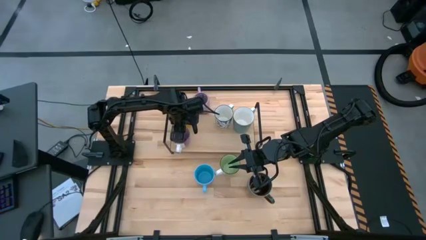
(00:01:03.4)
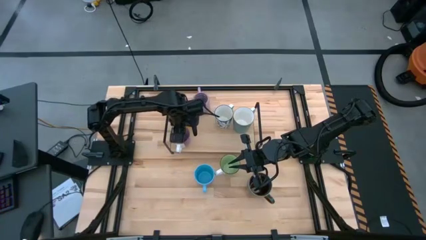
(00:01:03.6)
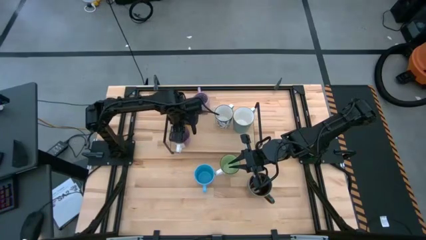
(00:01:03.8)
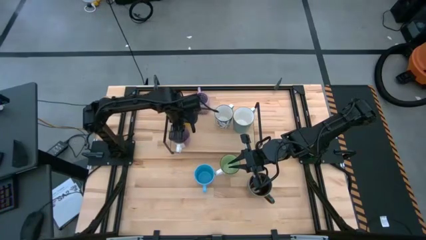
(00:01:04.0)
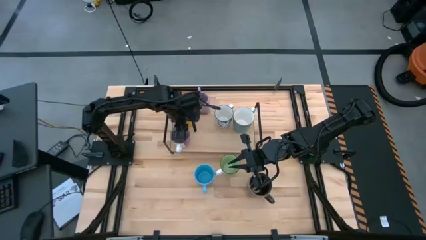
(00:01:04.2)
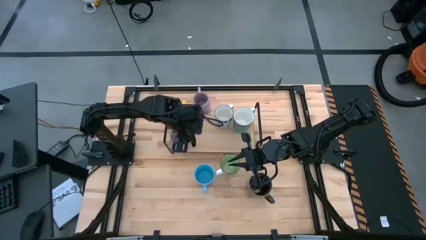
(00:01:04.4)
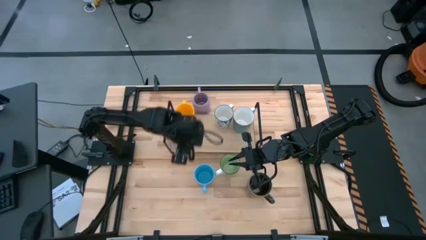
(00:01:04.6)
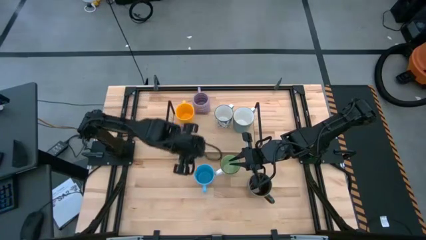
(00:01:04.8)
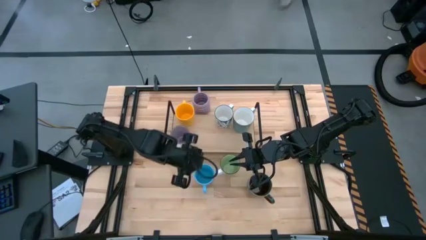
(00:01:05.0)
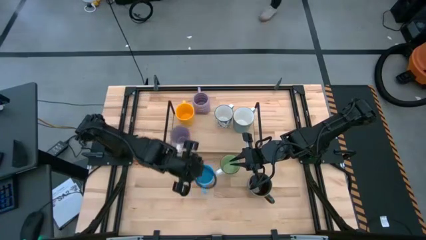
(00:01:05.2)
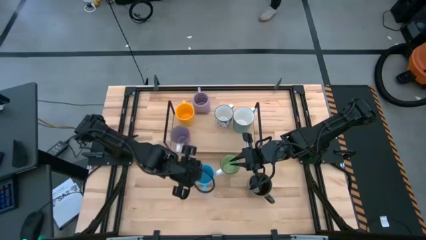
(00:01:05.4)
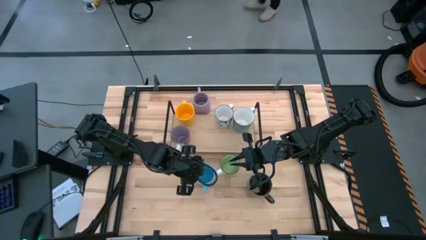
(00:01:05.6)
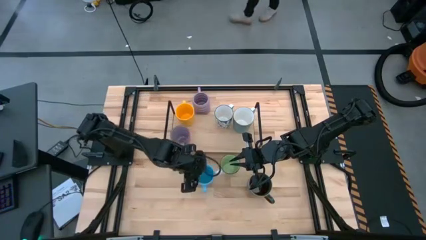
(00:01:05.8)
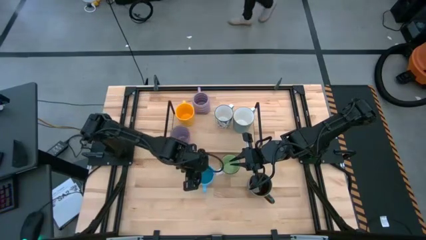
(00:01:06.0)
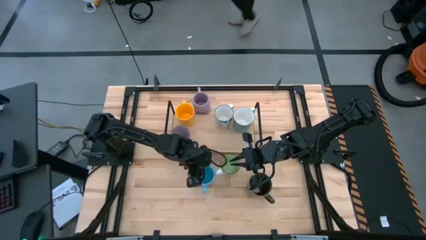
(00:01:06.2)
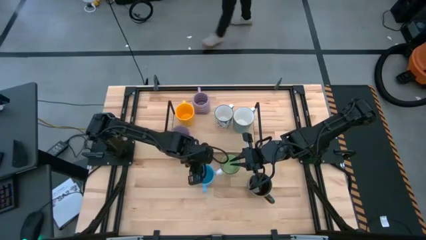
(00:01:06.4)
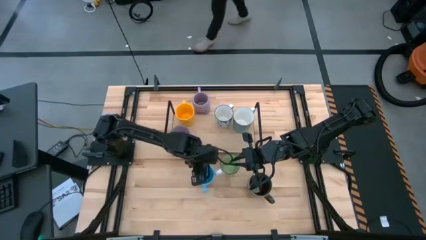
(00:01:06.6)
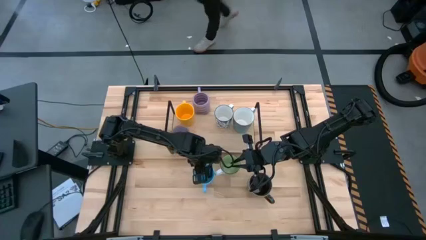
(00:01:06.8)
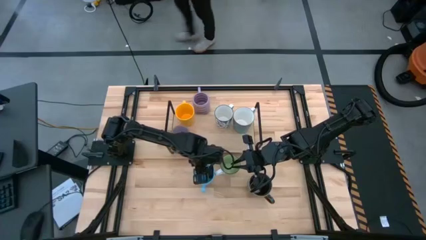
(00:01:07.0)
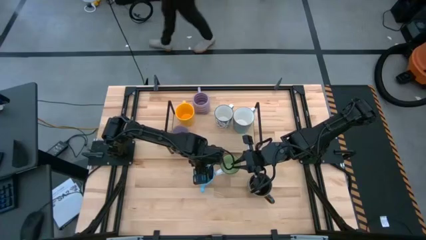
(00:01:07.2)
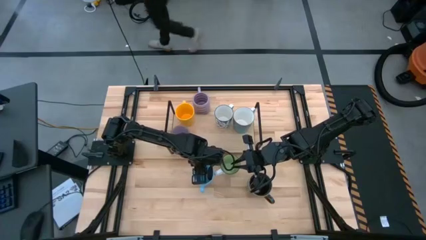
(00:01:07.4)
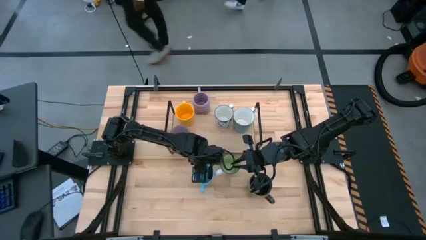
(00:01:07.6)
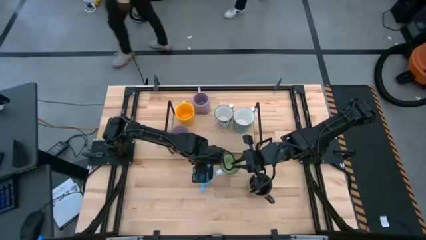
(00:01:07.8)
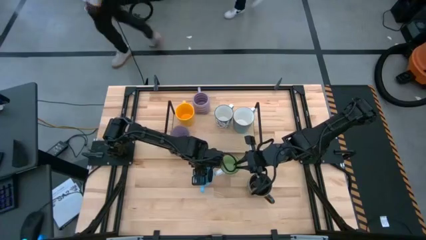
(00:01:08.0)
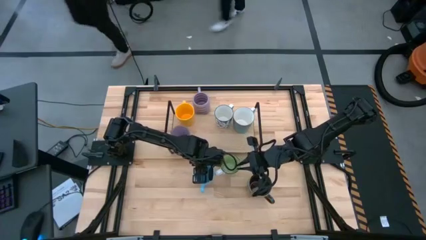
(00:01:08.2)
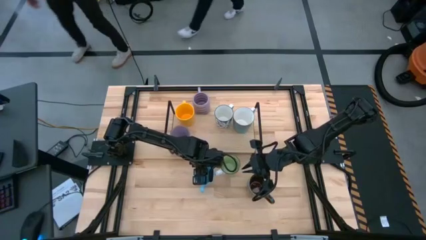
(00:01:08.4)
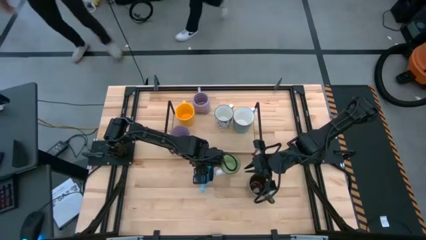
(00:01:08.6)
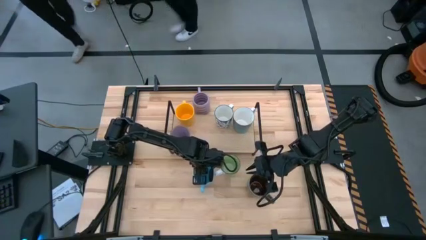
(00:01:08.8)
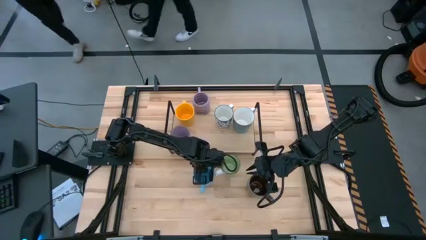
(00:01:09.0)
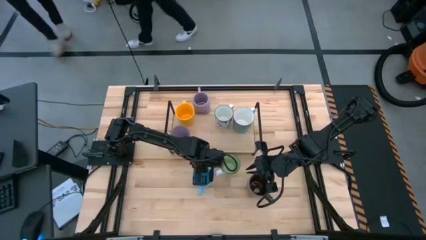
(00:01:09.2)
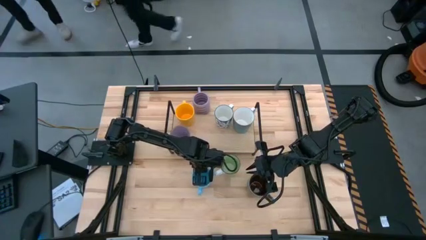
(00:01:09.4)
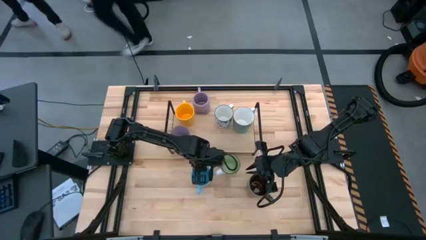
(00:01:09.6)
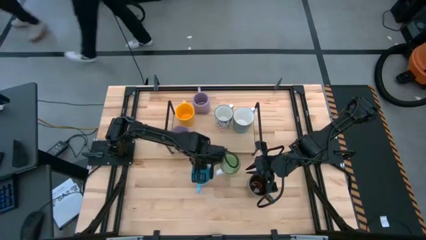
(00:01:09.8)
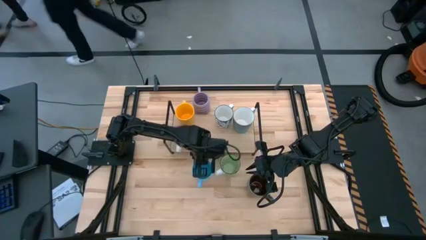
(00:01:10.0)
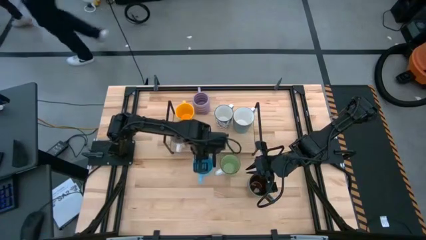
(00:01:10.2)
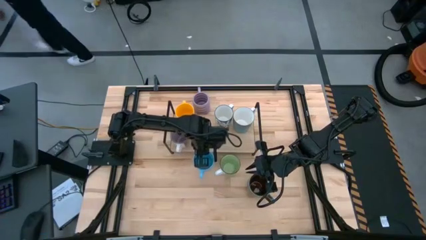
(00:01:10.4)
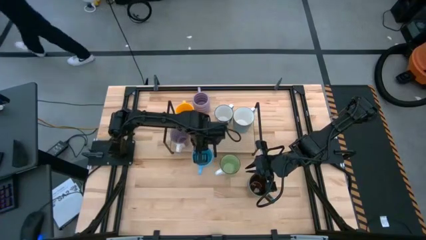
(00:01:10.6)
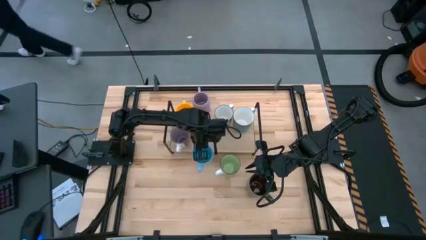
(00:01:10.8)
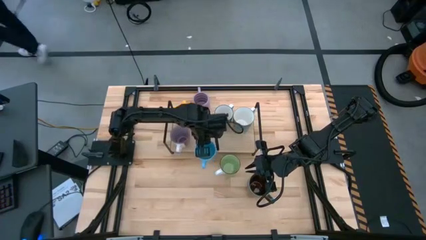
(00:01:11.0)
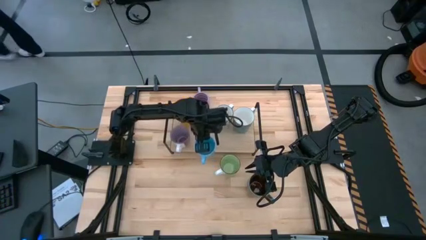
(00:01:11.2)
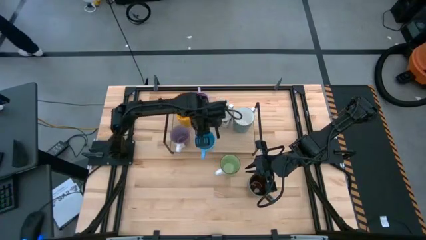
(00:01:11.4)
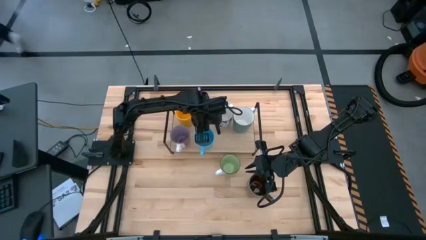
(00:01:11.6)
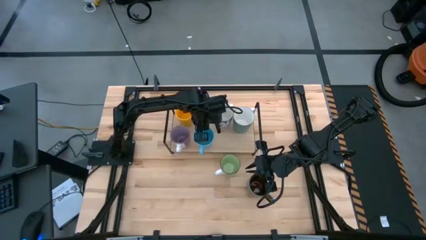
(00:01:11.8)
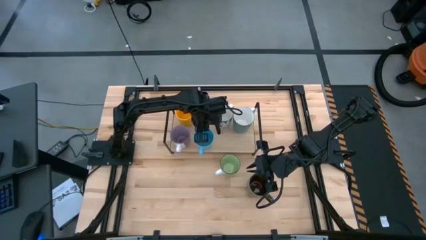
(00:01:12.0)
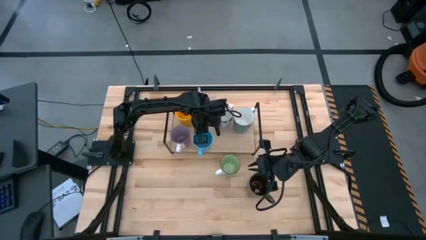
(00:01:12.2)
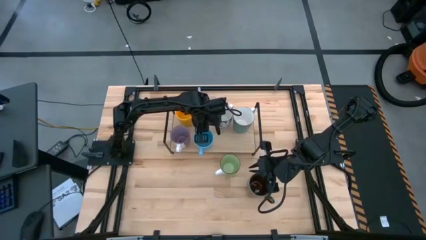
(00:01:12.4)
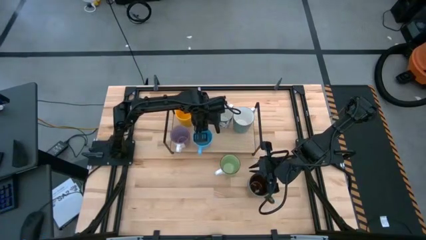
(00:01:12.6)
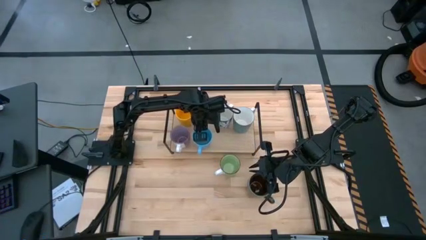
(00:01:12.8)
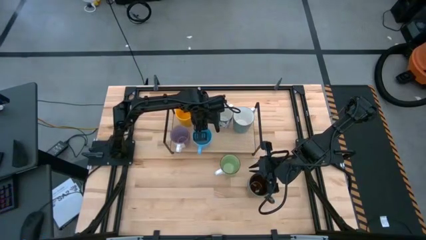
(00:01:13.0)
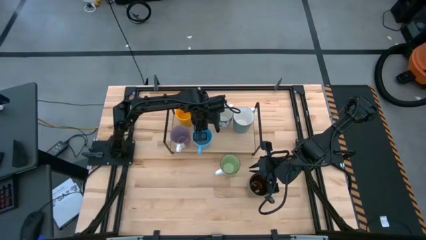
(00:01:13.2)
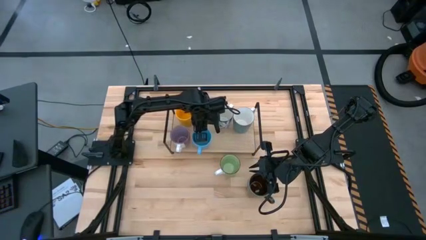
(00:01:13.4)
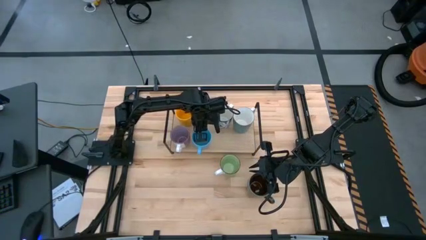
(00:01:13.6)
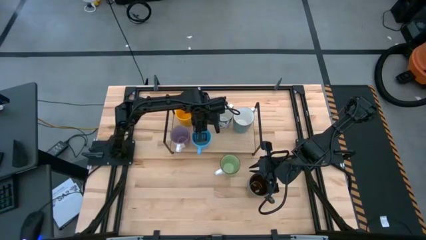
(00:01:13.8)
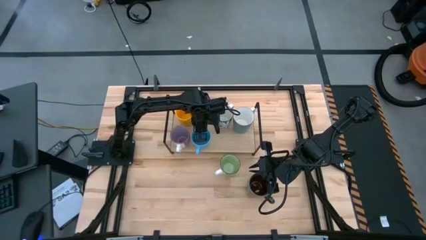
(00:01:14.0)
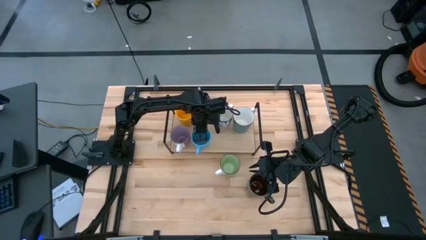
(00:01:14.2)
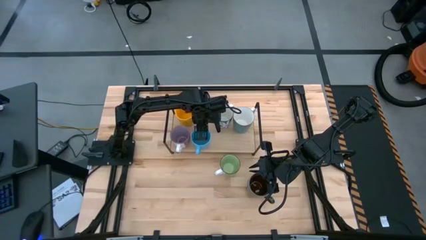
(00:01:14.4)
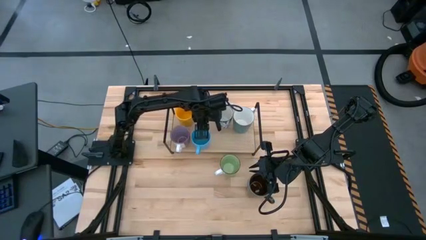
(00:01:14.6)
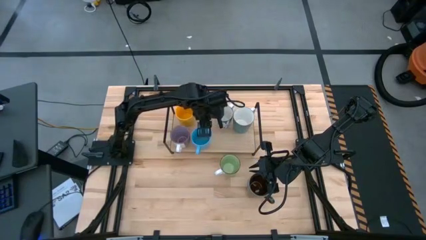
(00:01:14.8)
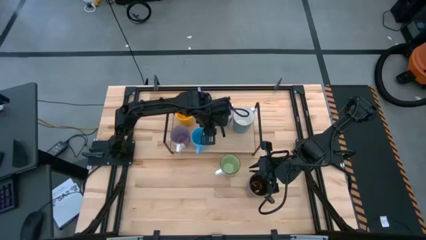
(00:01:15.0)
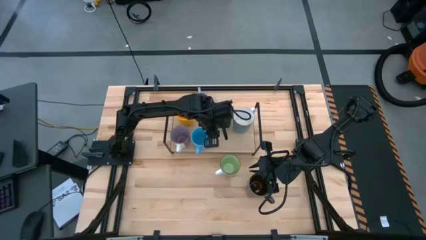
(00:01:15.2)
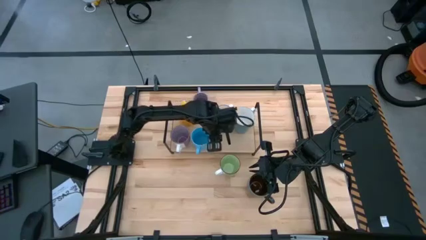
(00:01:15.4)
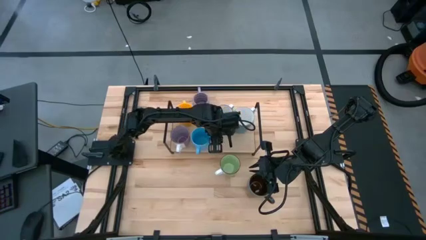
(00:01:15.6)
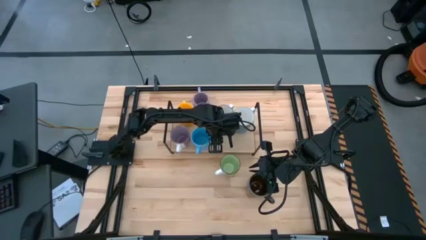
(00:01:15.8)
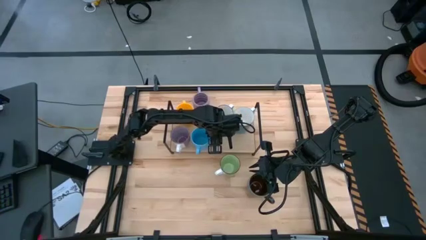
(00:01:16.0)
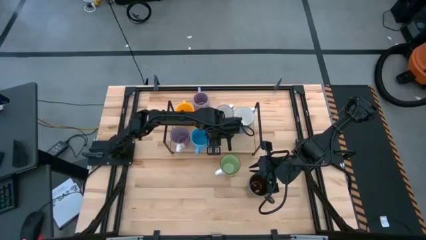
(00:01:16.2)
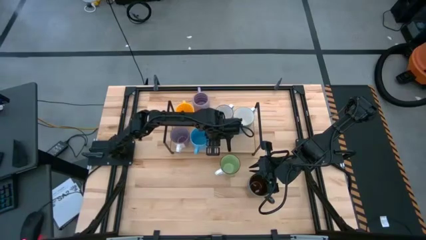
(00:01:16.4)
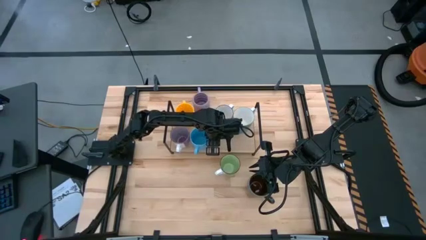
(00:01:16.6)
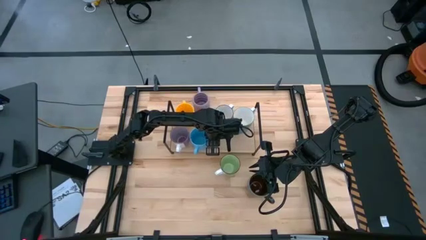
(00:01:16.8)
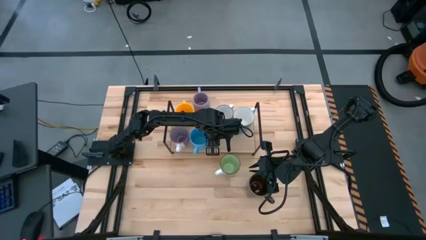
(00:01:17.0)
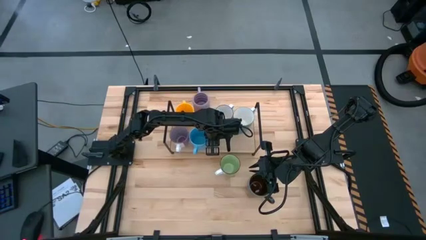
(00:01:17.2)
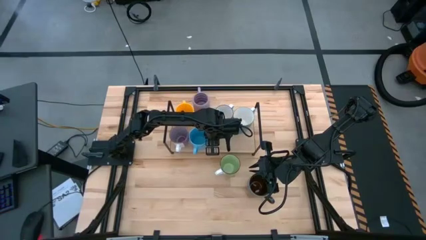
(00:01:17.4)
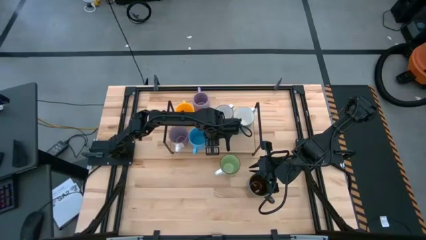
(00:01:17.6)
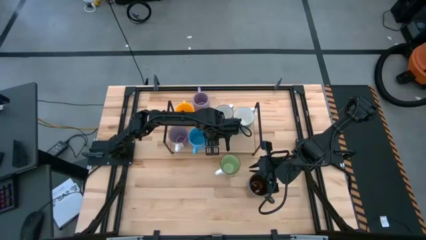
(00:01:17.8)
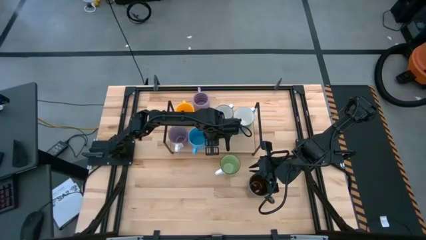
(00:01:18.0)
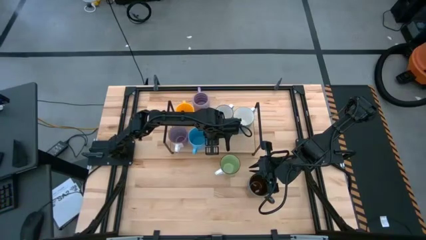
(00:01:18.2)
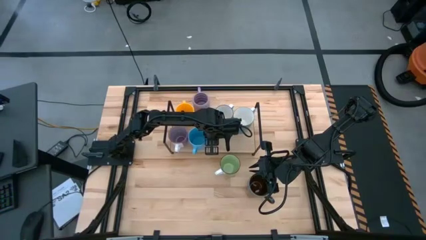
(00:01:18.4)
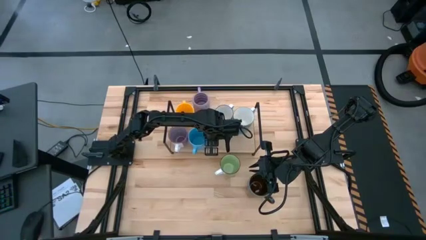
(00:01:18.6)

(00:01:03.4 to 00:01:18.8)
Task: Place coffee mugs
Put the light blue mug on the shelf
